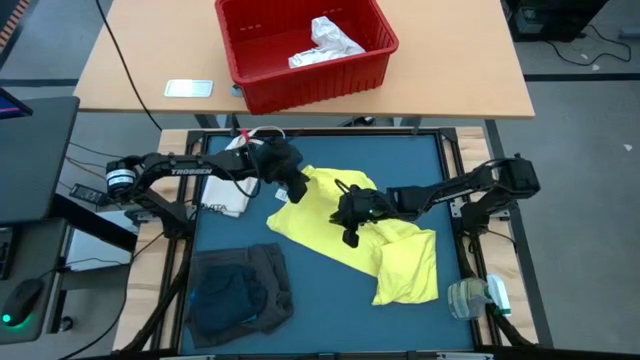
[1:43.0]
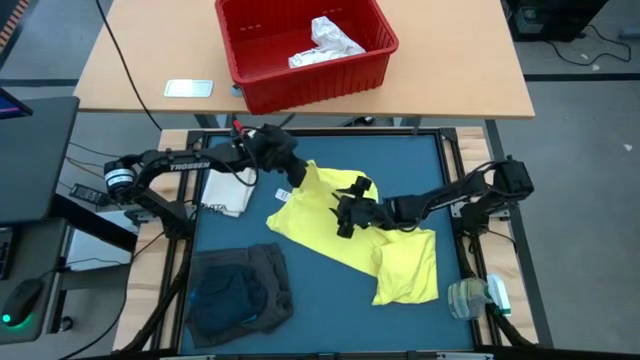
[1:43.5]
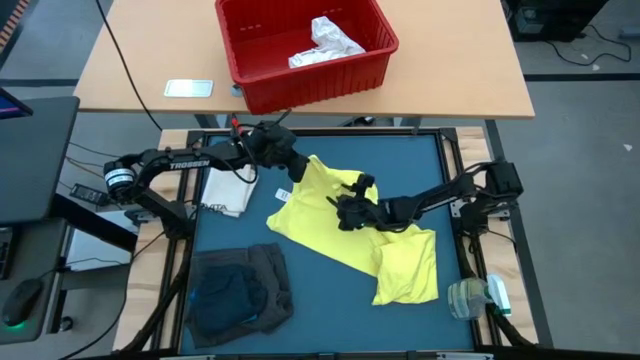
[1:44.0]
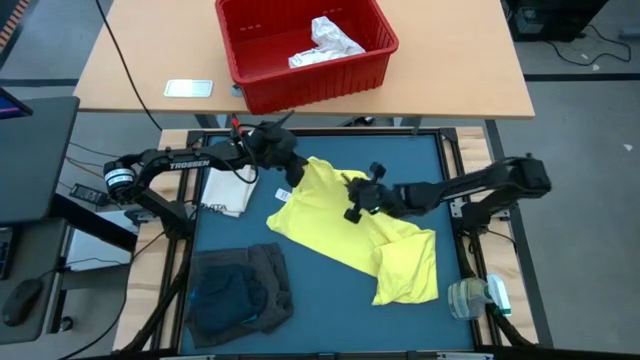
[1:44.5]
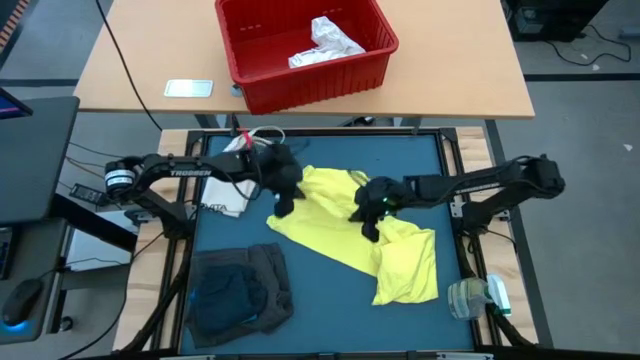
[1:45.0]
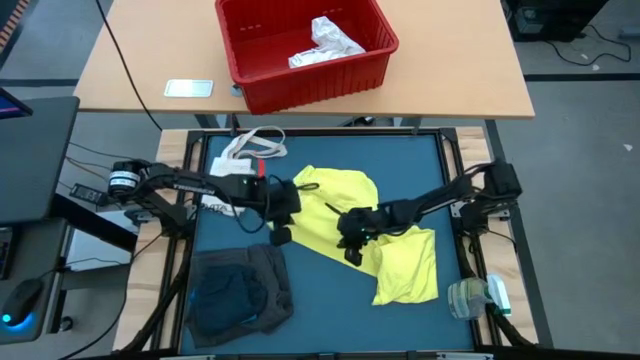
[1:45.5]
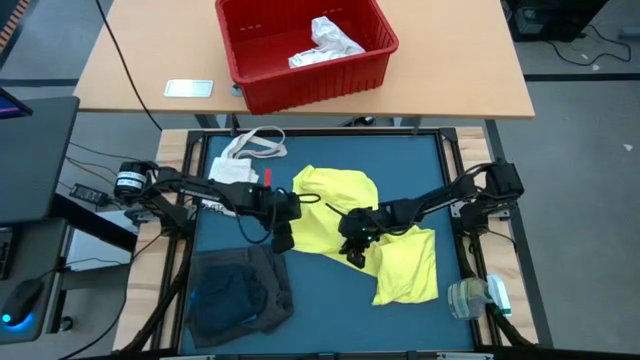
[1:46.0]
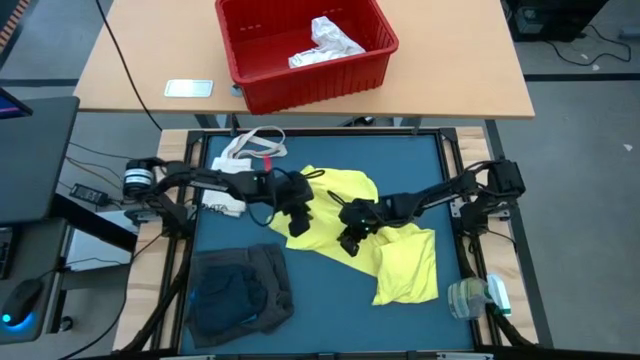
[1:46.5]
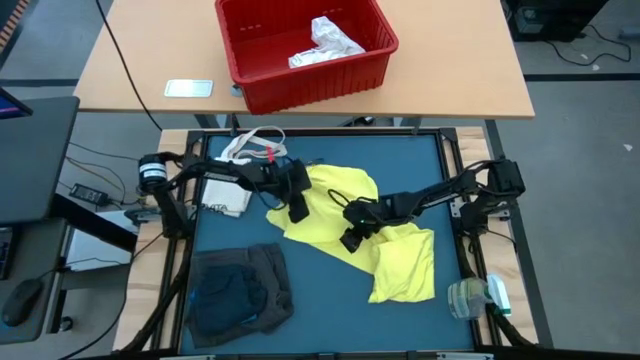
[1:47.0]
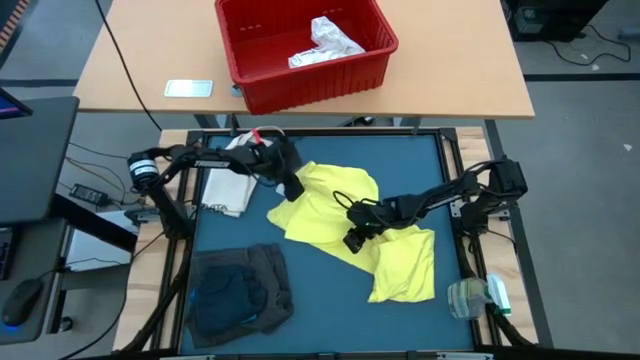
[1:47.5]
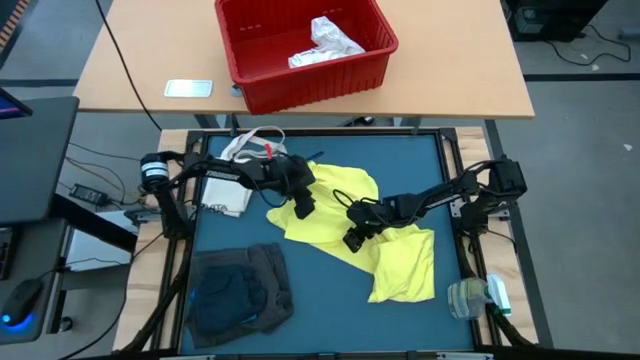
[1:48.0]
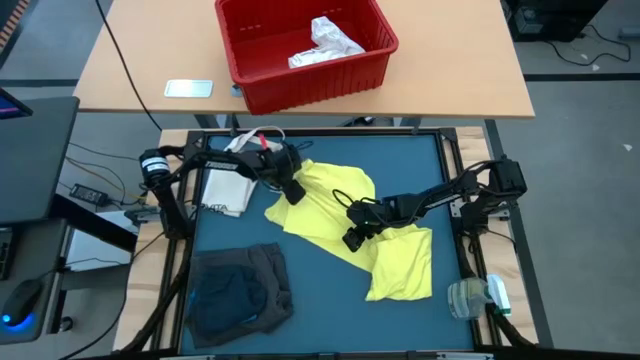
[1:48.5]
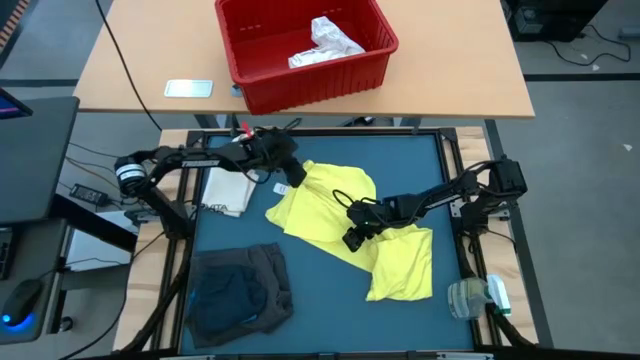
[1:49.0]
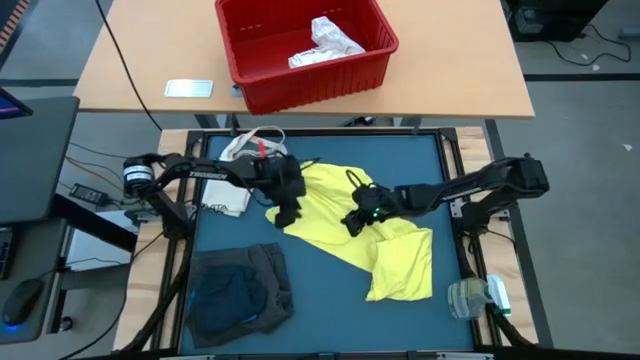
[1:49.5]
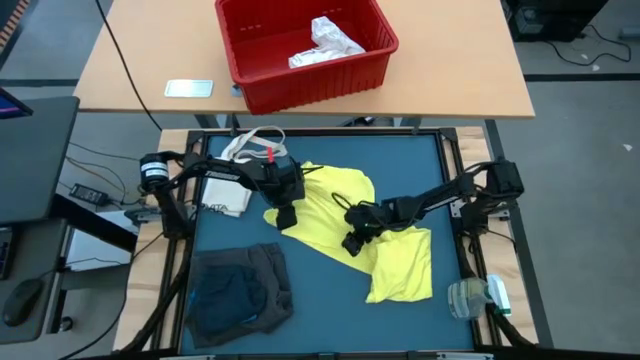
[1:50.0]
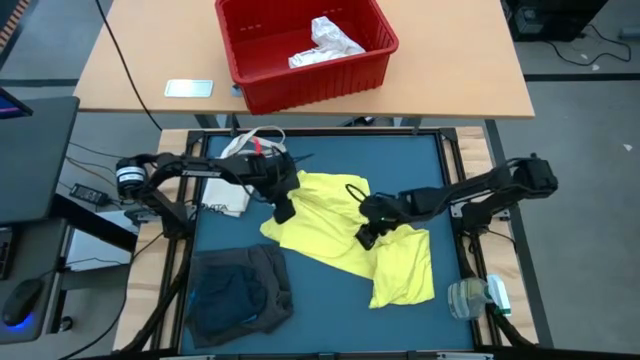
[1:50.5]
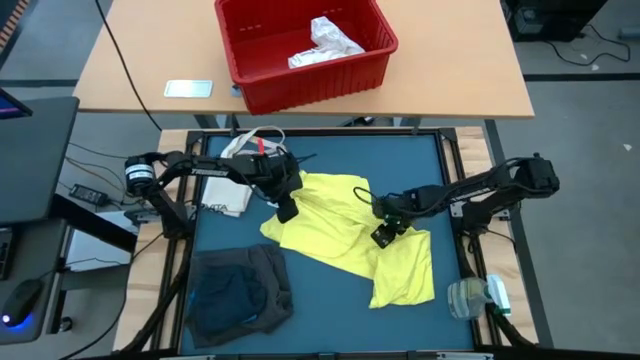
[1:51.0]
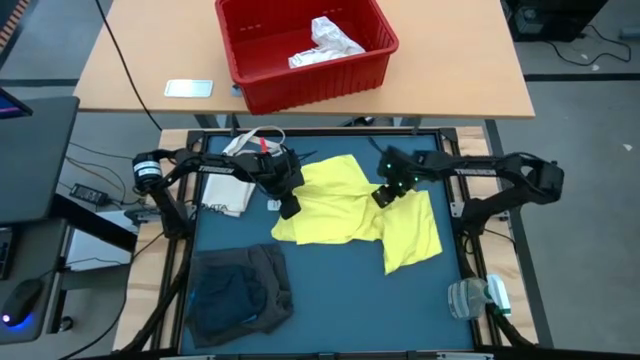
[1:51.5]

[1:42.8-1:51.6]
Task: Fold laundry
Fold the yellow shirt

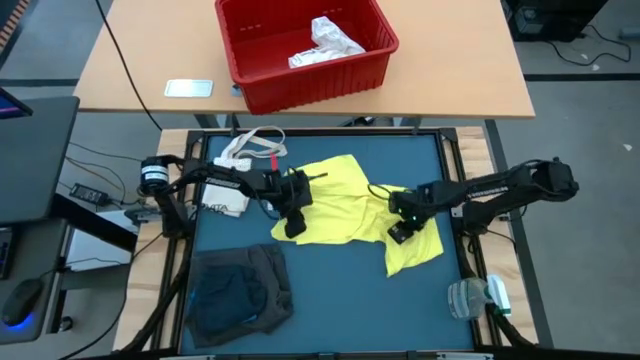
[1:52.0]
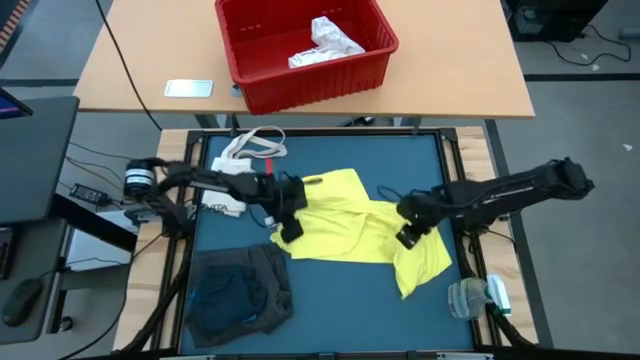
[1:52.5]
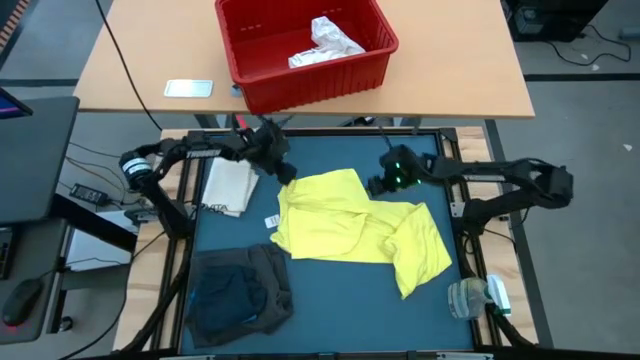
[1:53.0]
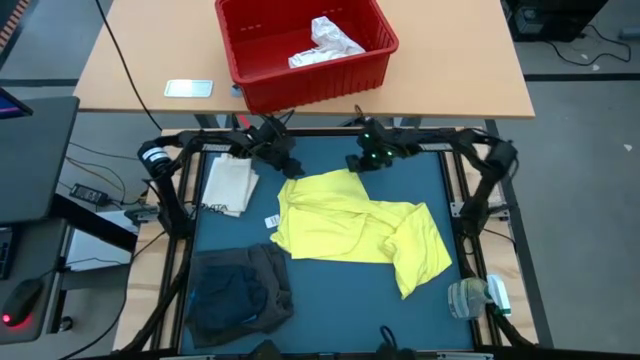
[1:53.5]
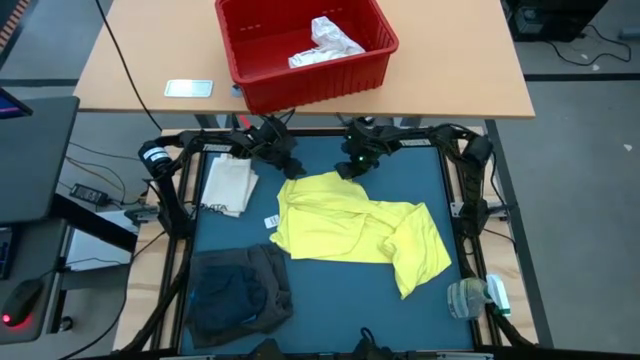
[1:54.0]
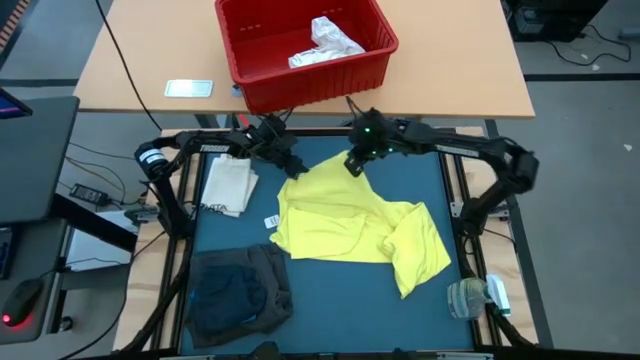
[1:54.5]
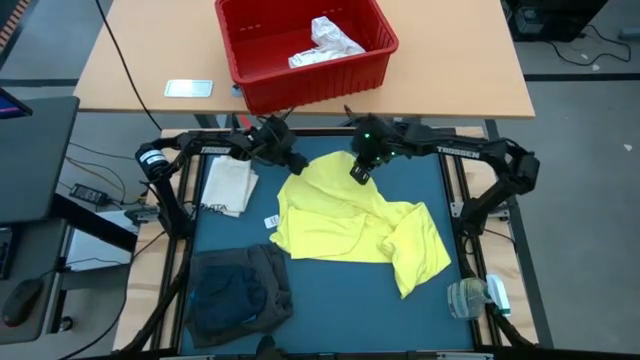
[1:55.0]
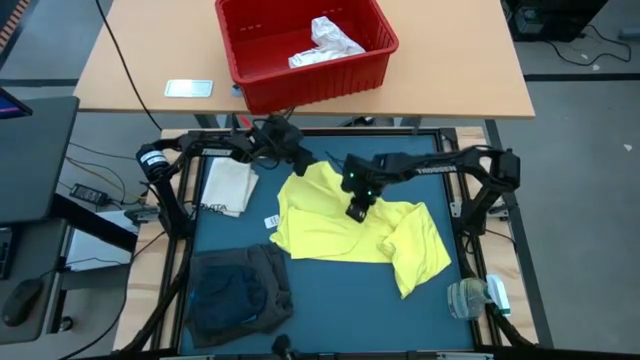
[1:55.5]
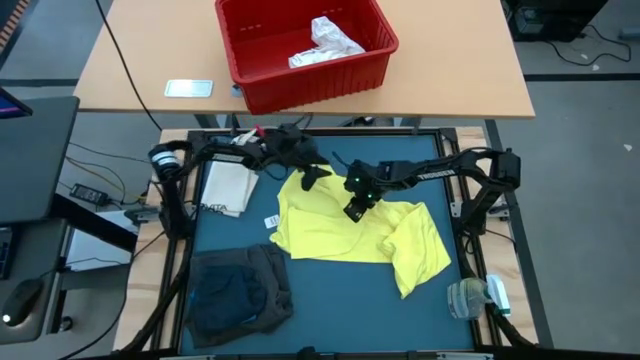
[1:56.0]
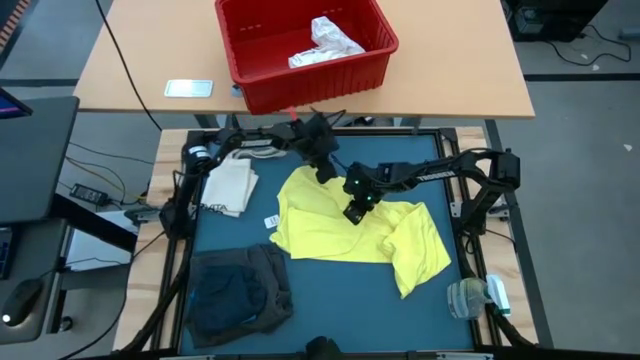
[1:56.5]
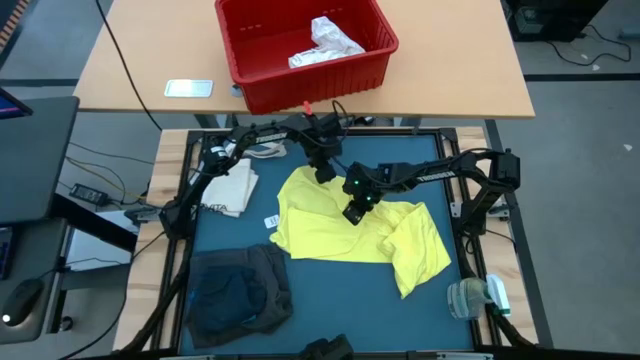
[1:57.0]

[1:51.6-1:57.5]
Fold the yellow shirt

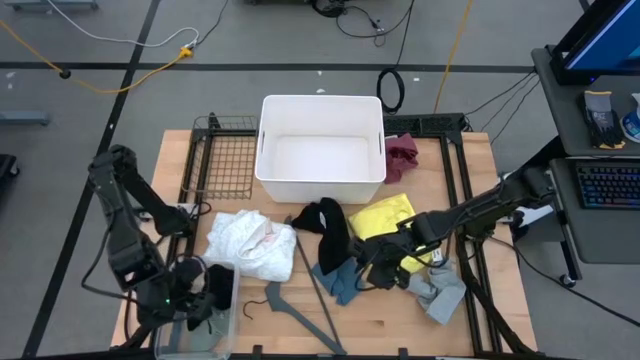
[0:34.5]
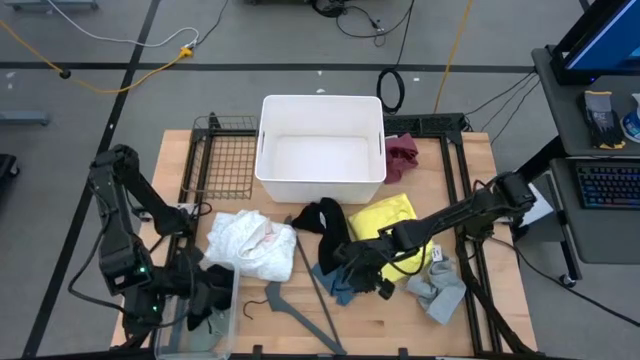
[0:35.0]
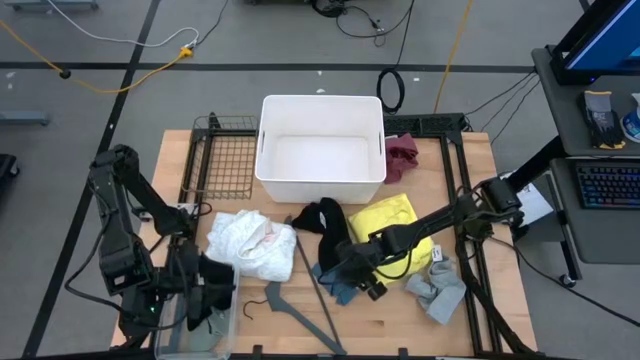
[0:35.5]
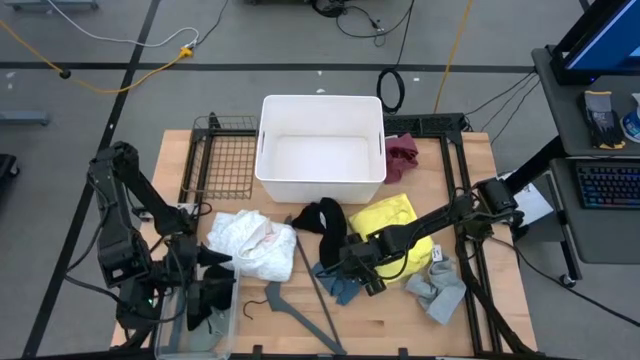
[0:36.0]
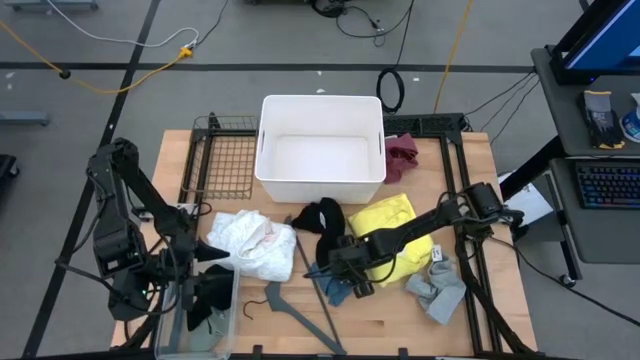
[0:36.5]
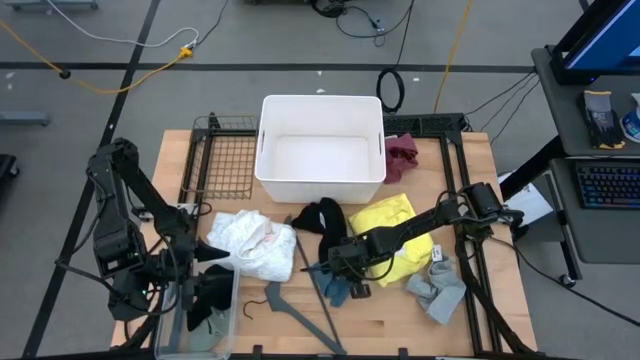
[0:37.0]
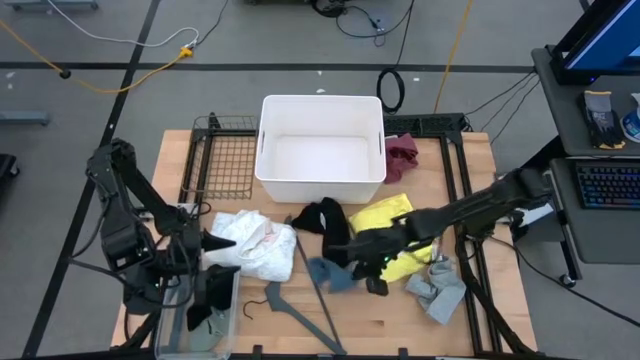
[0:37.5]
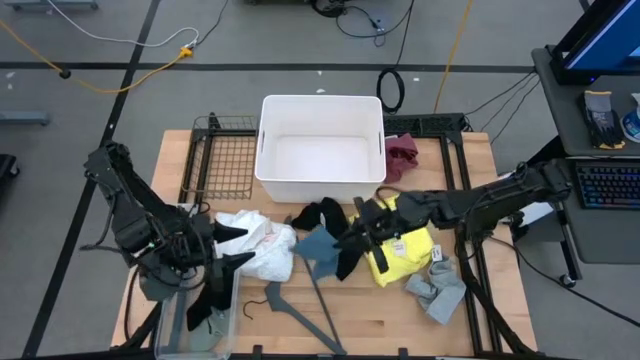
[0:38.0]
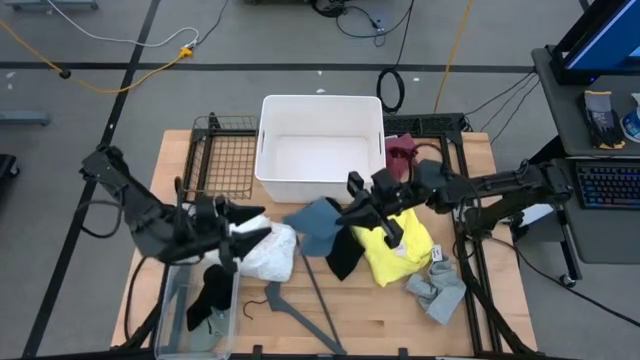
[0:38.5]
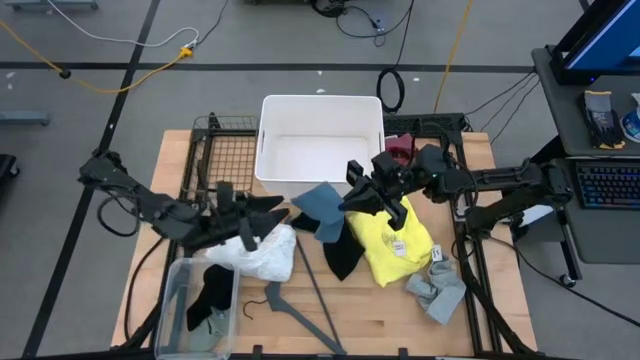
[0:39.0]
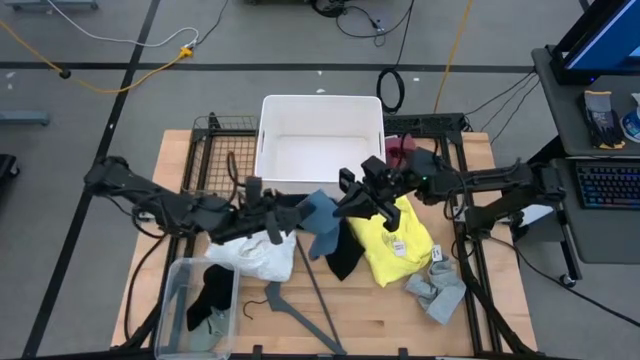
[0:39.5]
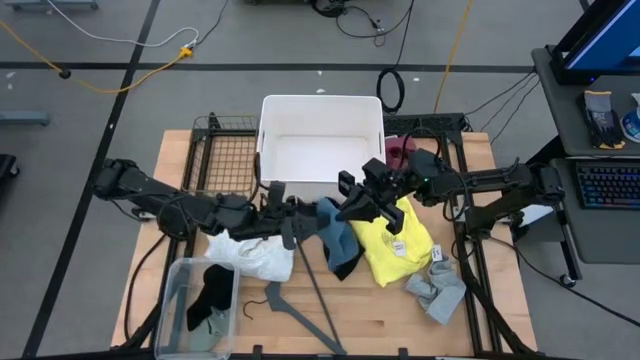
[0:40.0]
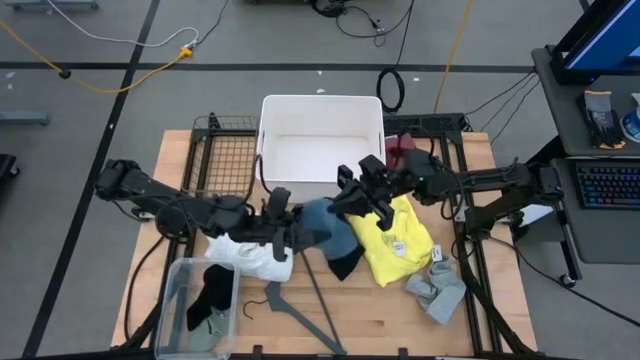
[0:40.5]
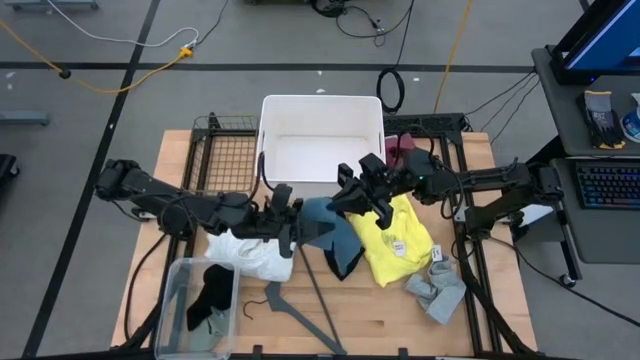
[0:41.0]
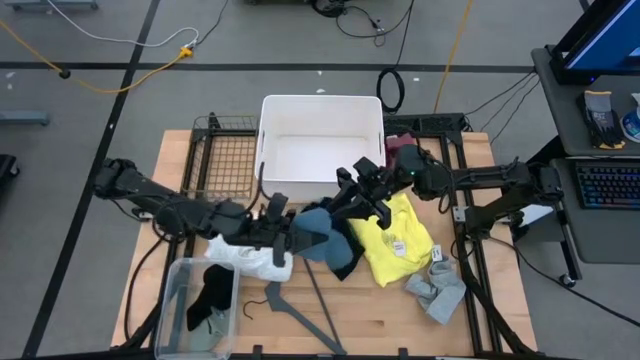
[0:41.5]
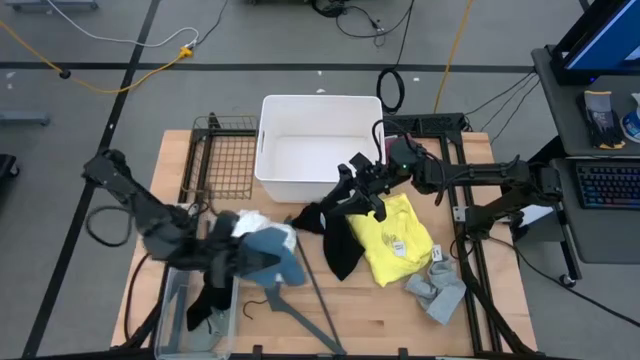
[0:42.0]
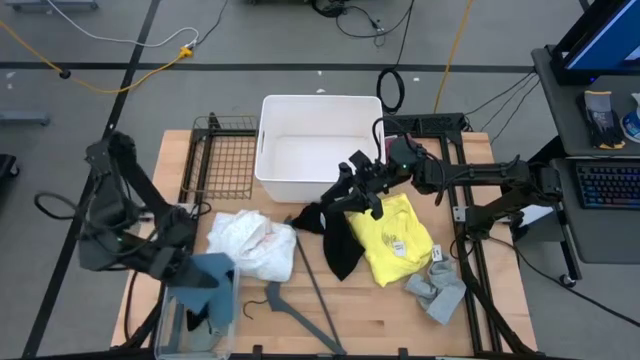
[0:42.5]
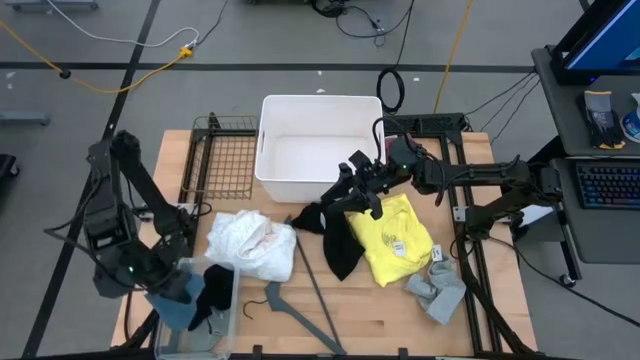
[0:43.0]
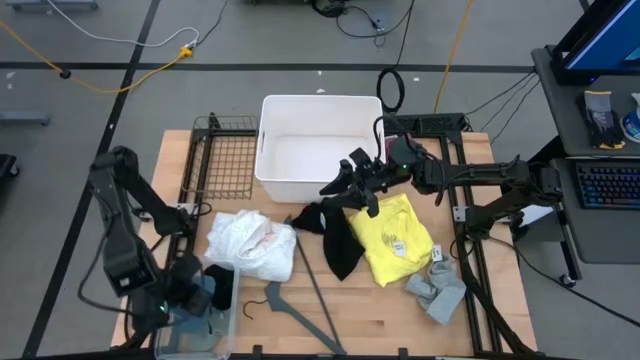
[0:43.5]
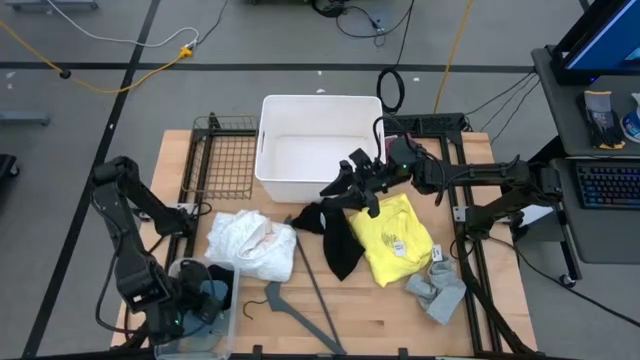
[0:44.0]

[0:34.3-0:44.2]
Task: Pick & Place Cloths
Put the gray sock into the transparent bin
